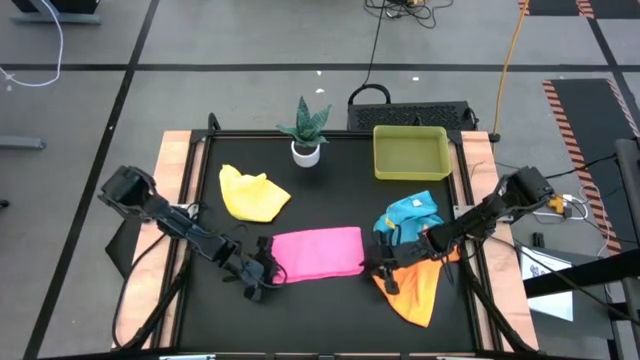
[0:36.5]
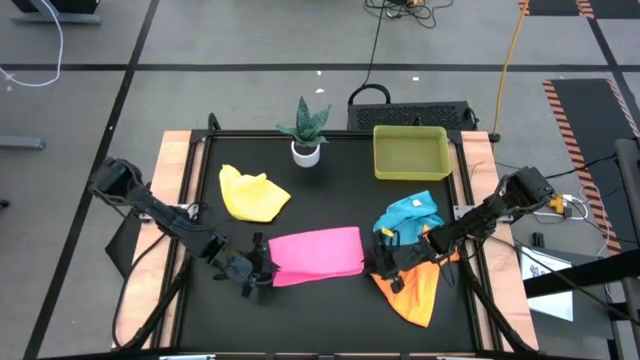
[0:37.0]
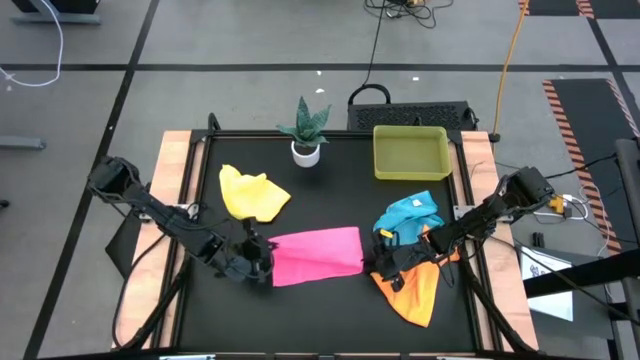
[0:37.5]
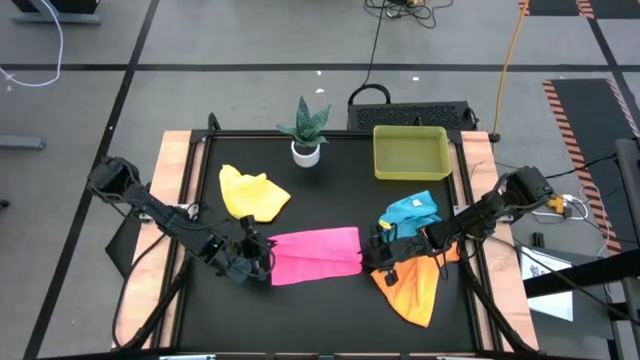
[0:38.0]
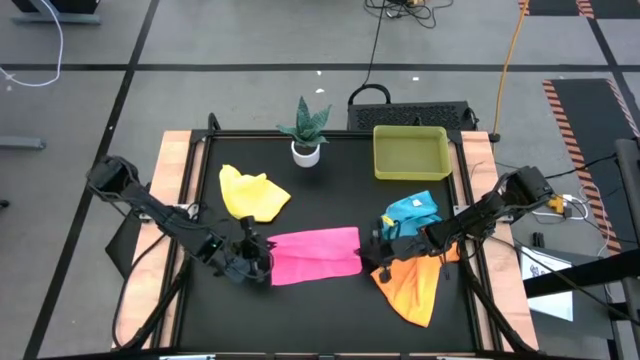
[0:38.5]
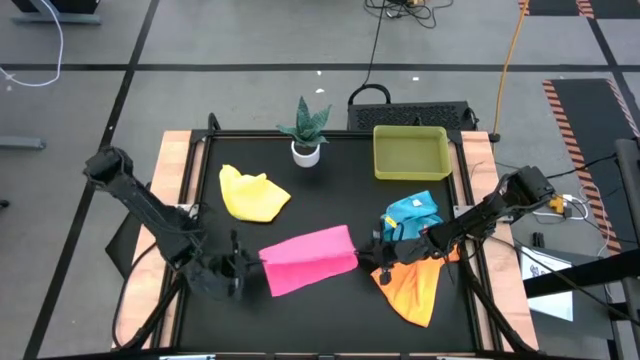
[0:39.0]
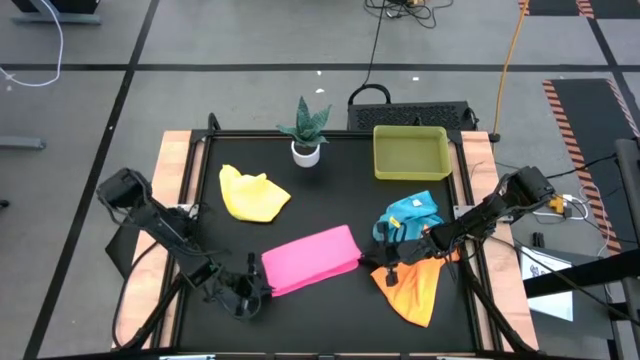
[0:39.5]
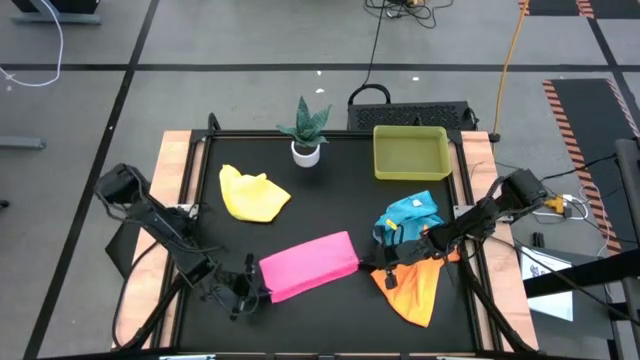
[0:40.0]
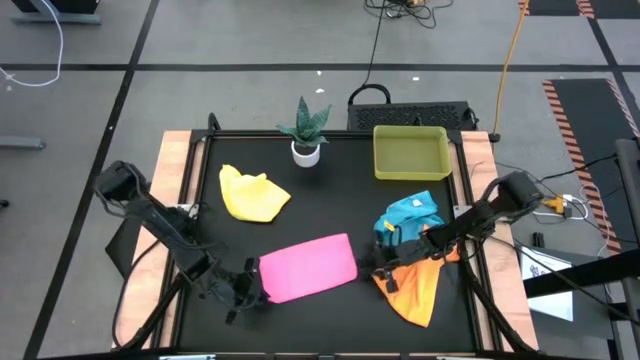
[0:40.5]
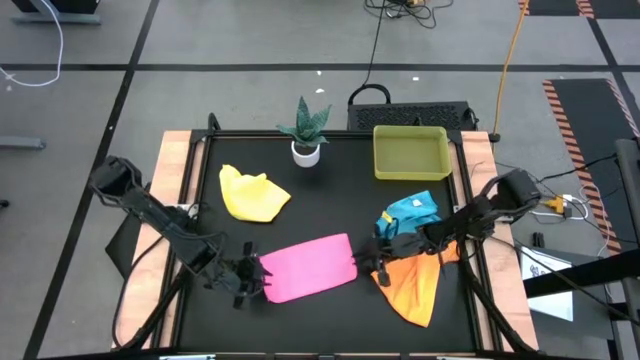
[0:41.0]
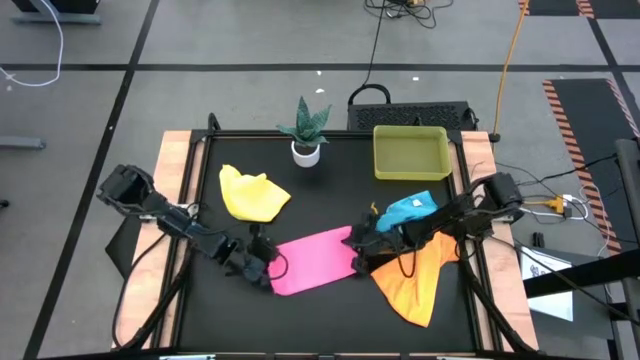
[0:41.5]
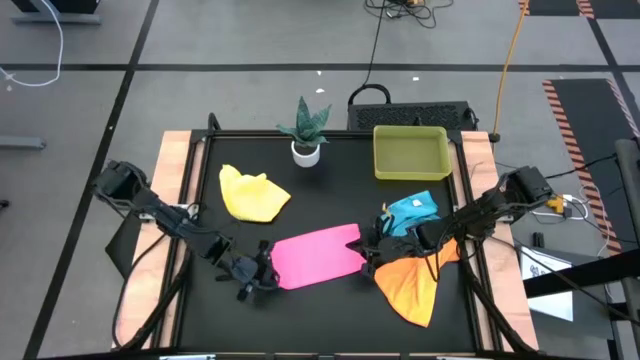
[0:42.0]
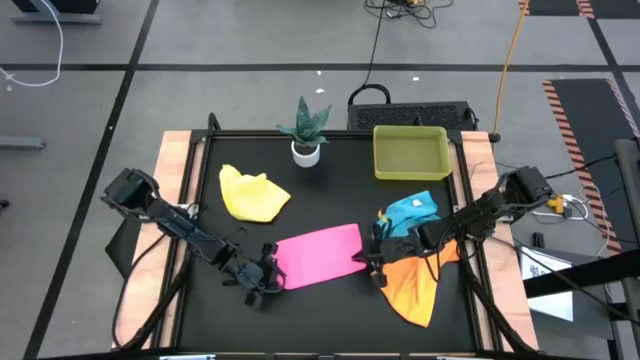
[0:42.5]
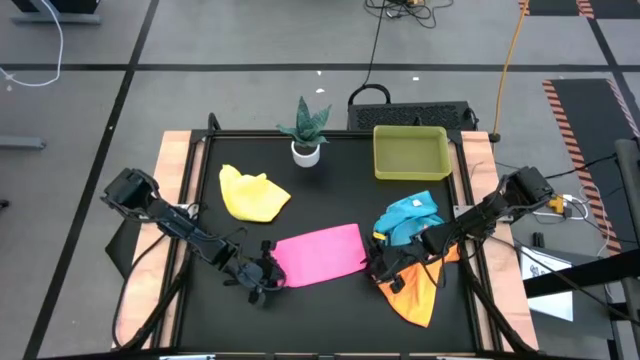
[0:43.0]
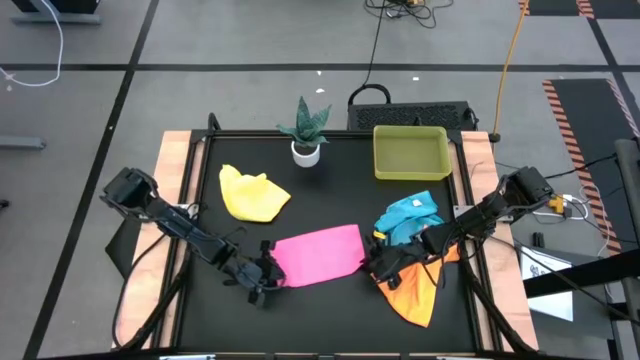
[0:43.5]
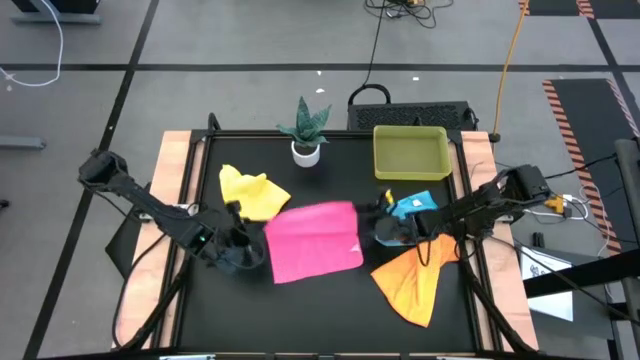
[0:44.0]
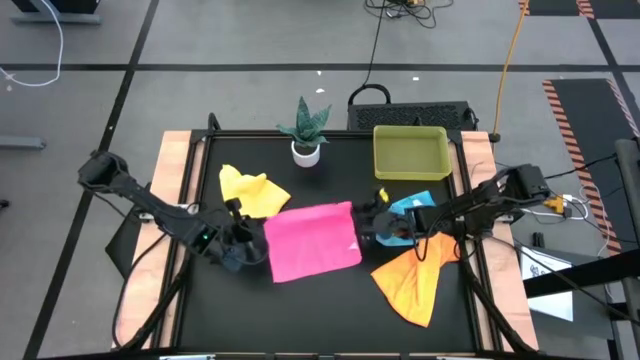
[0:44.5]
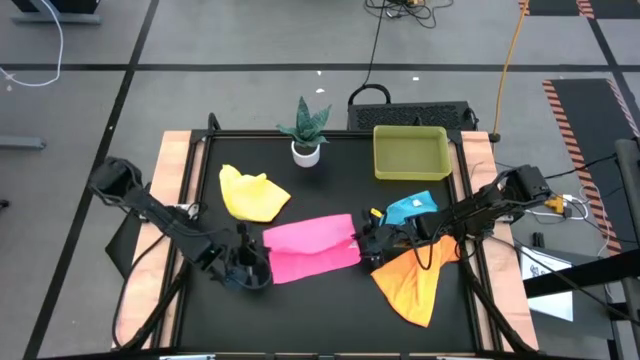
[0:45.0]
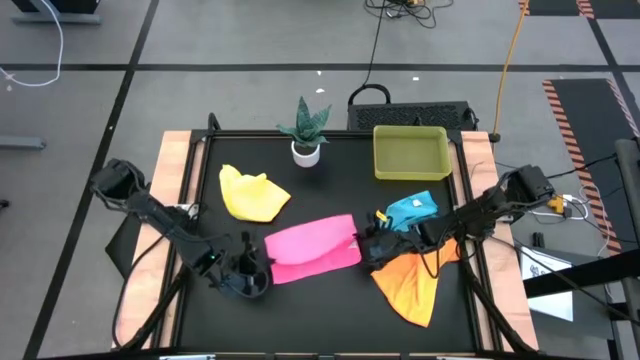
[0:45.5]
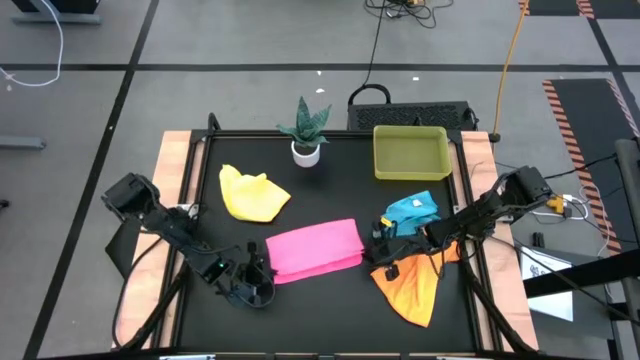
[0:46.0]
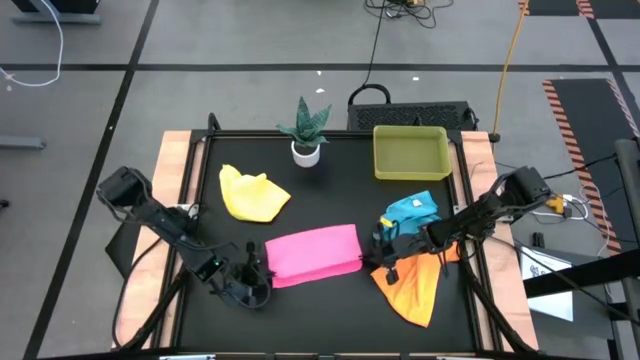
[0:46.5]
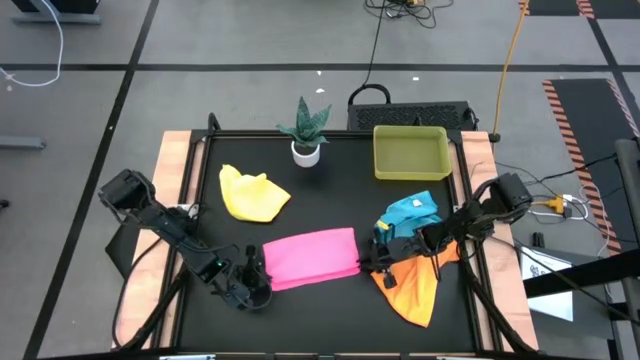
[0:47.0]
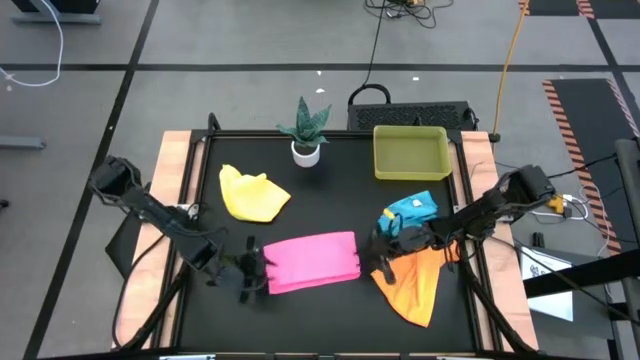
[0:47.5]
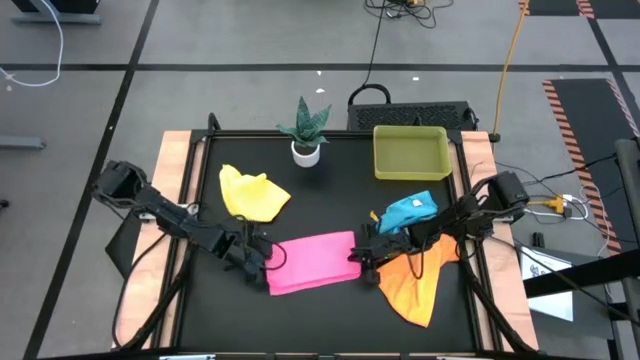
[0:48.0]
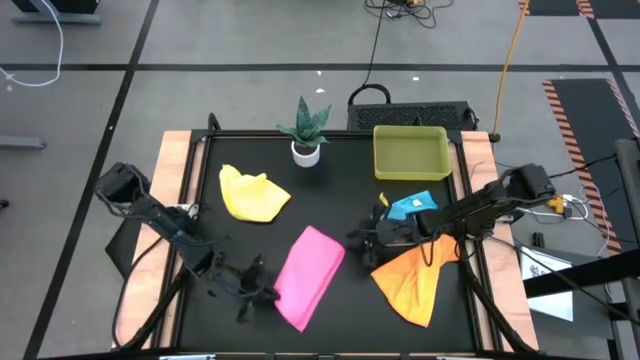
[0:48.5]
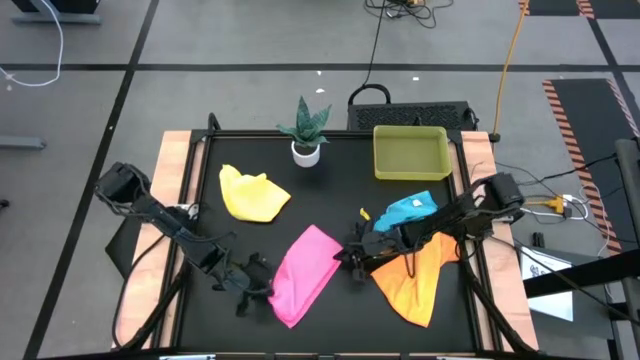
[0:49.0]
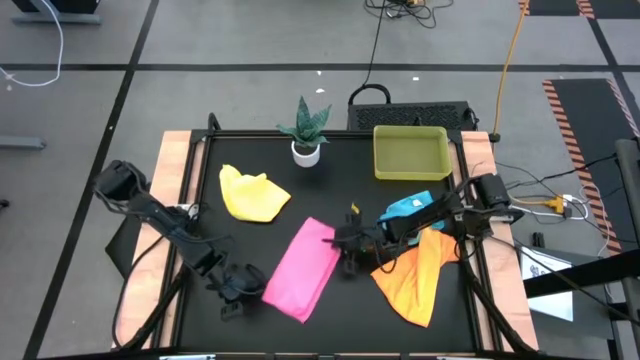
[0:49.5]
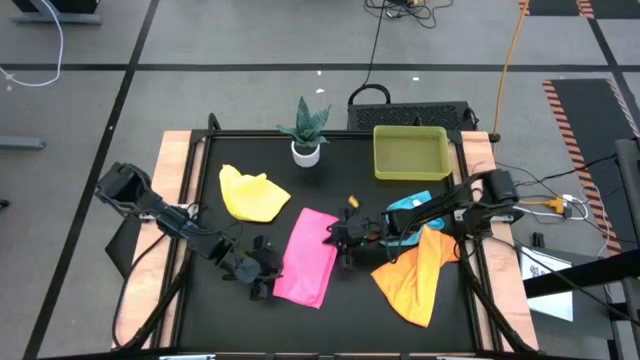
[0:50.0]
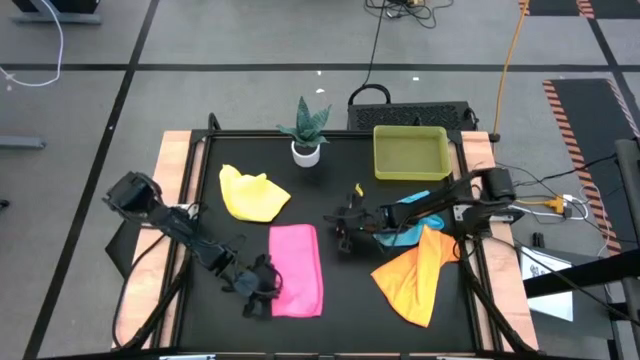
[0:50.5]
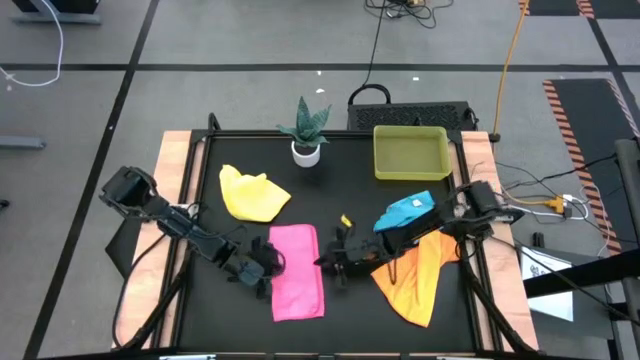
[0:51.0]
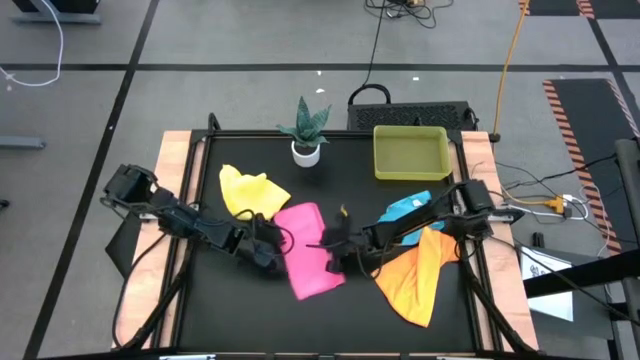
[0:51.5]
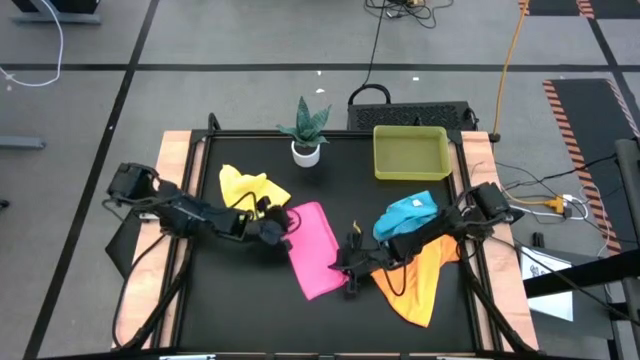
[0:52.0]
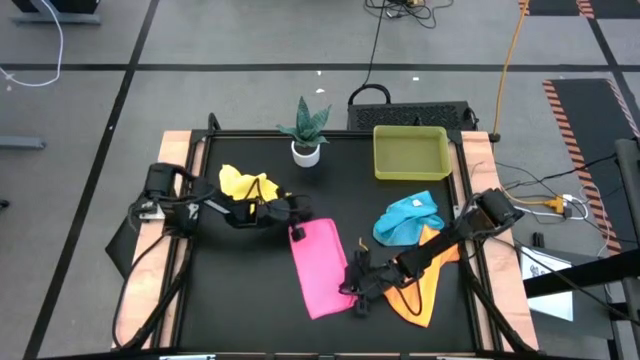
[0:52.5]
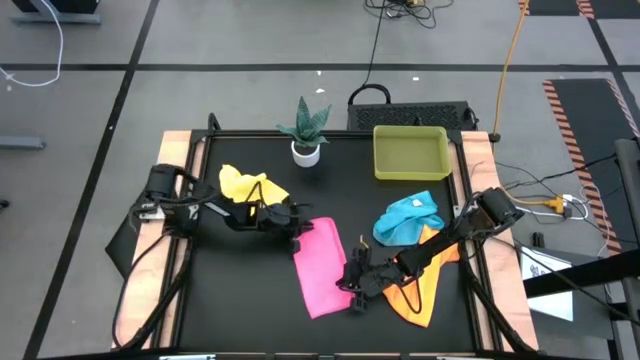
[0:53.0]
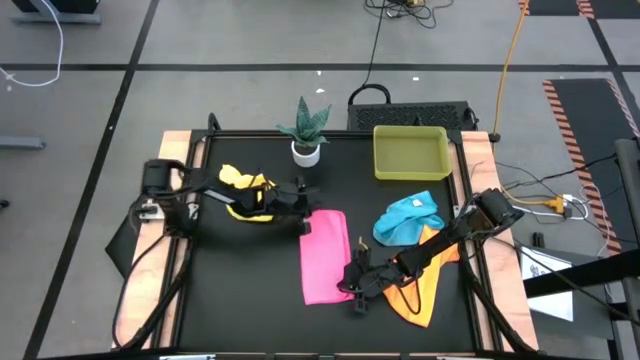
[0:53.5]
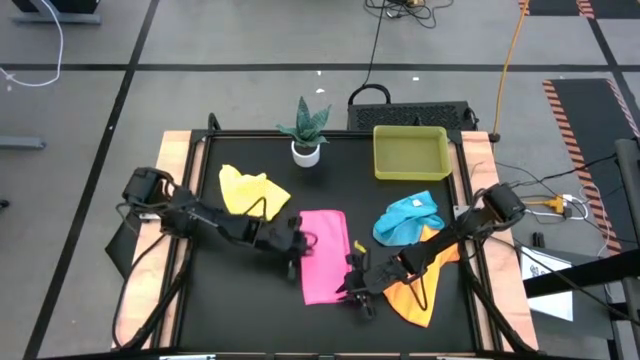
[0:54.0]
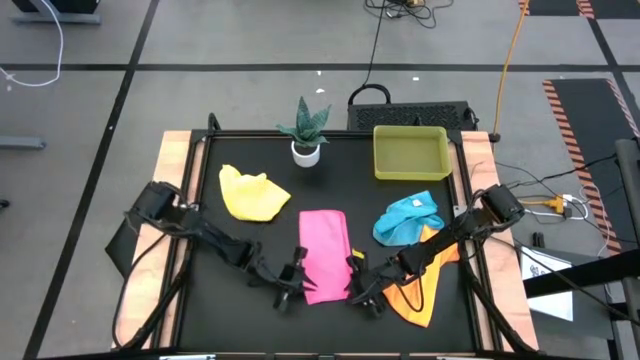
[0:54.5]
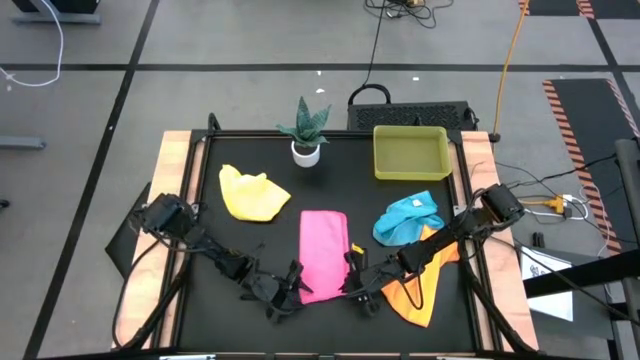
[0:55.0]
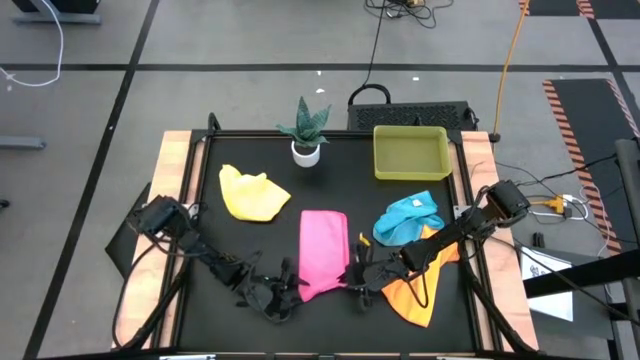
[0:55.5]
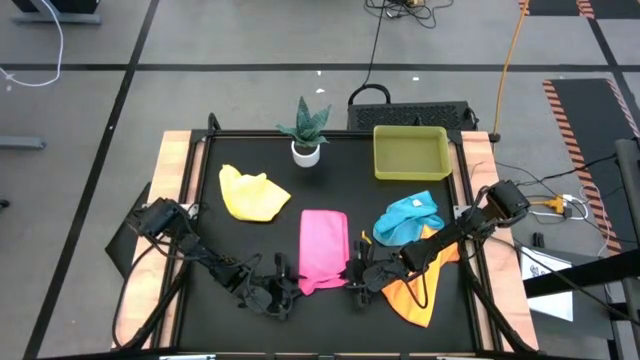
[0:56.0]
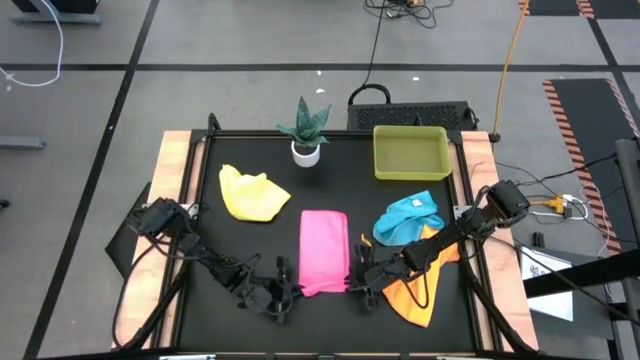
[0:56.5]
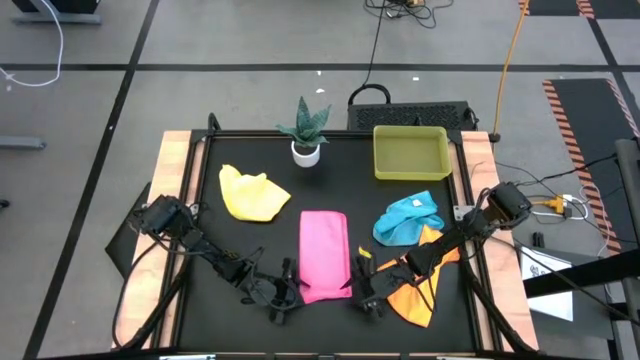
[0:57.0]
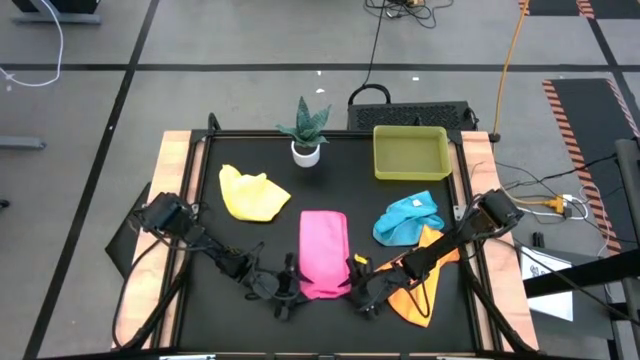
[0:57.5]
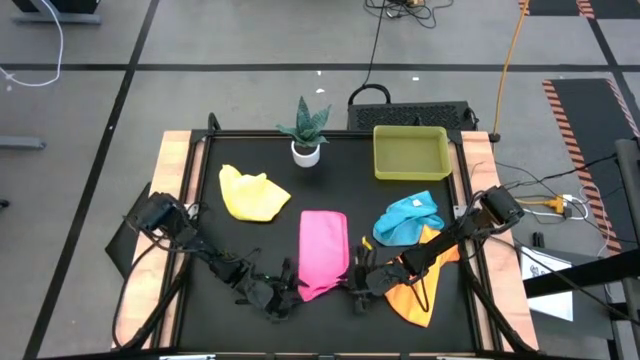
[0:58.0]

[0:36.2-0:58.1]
Task: Fold microfiber towels
Fold the pink microfiber cloth
